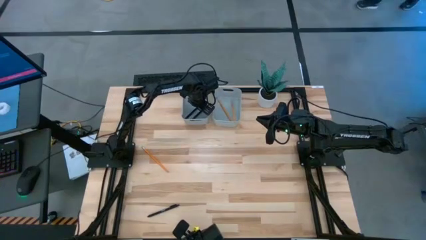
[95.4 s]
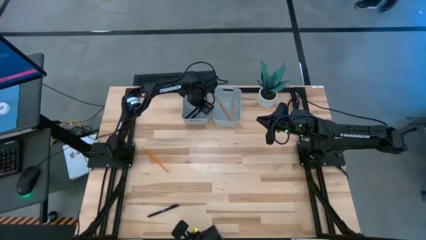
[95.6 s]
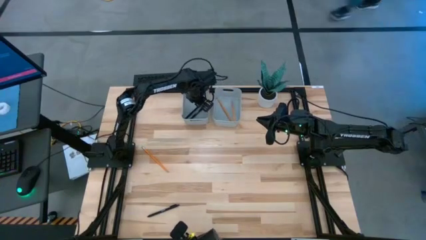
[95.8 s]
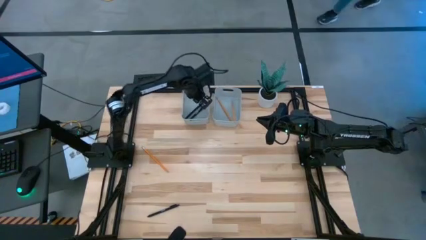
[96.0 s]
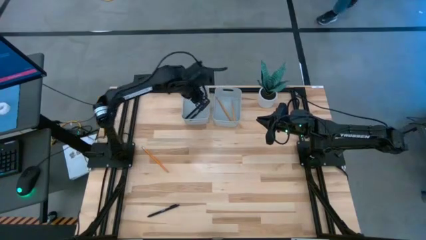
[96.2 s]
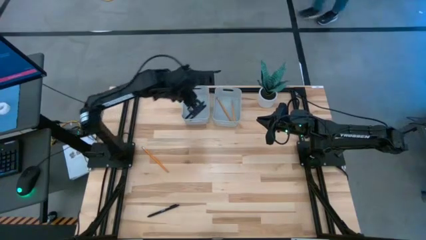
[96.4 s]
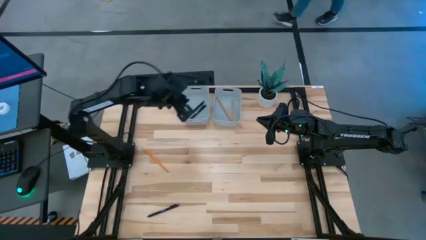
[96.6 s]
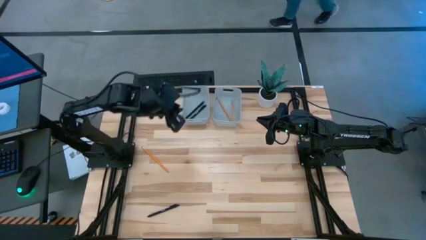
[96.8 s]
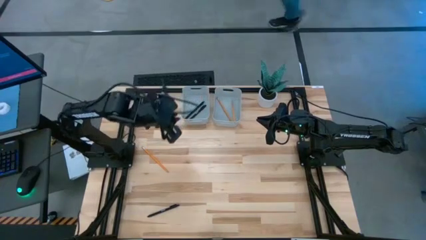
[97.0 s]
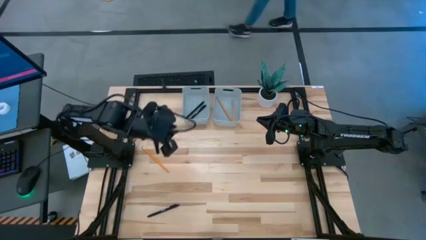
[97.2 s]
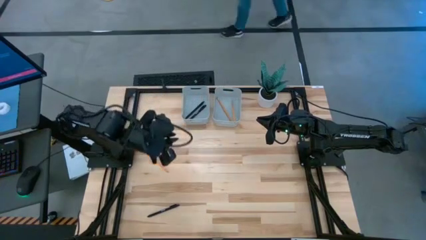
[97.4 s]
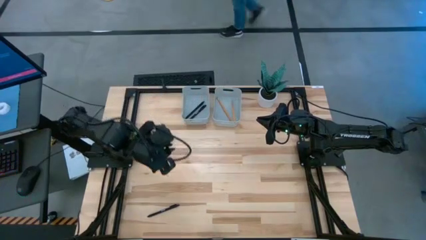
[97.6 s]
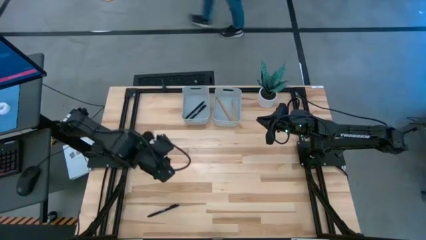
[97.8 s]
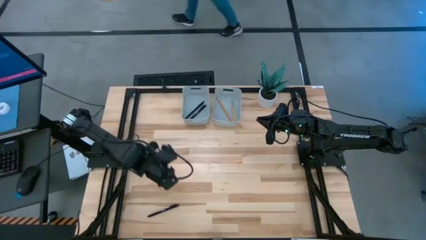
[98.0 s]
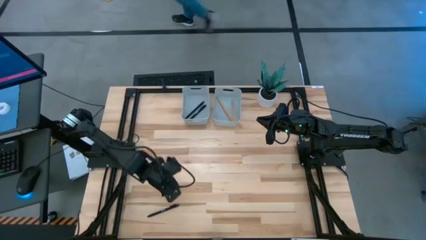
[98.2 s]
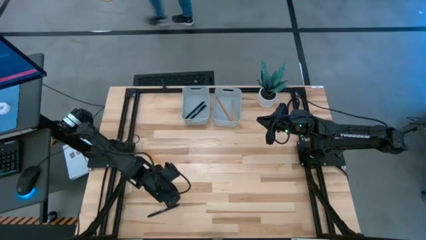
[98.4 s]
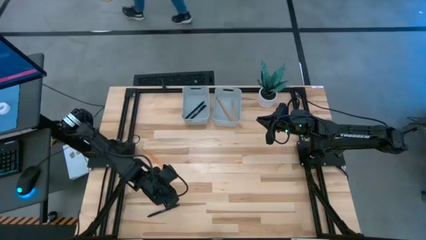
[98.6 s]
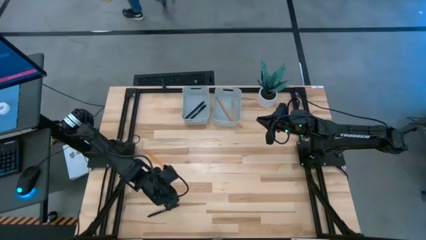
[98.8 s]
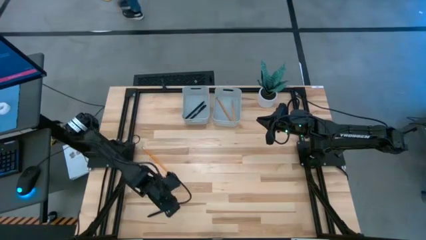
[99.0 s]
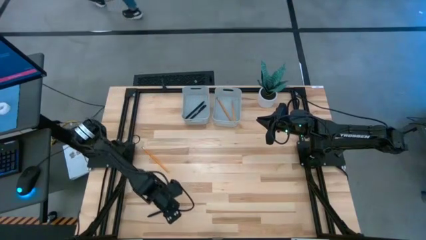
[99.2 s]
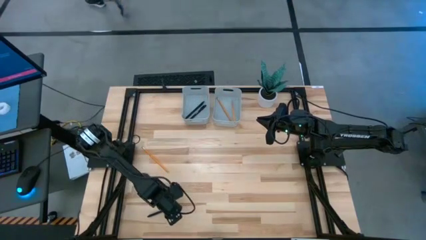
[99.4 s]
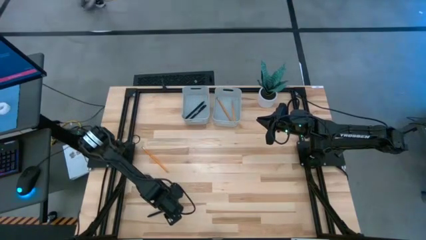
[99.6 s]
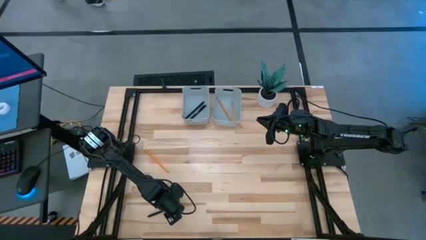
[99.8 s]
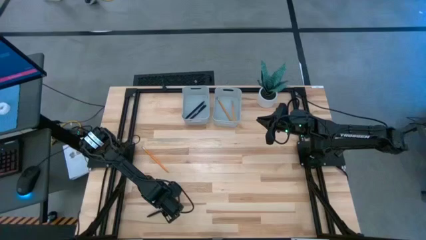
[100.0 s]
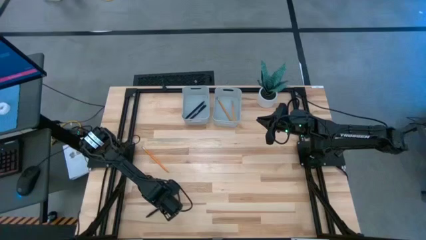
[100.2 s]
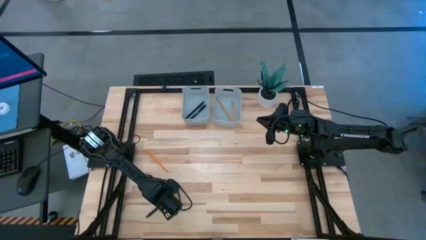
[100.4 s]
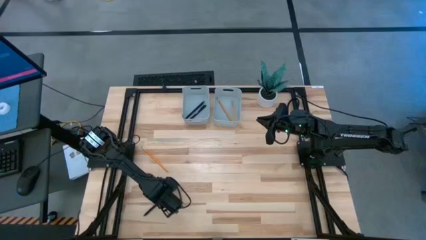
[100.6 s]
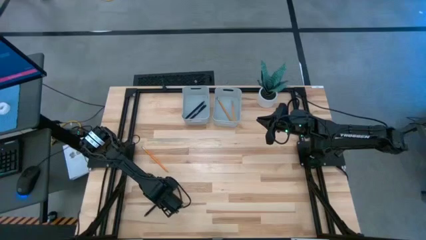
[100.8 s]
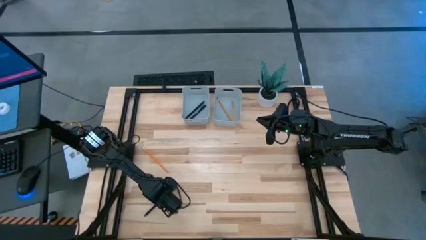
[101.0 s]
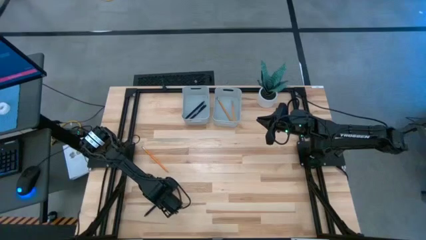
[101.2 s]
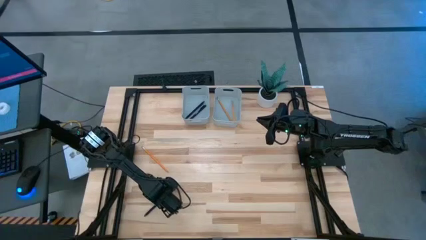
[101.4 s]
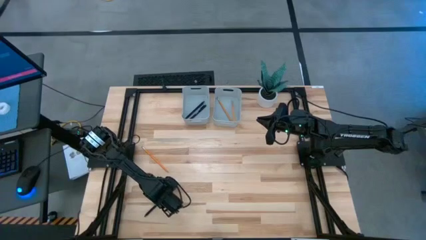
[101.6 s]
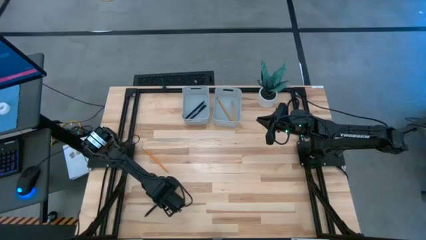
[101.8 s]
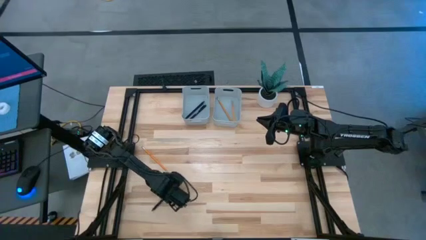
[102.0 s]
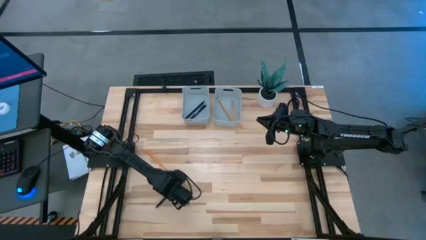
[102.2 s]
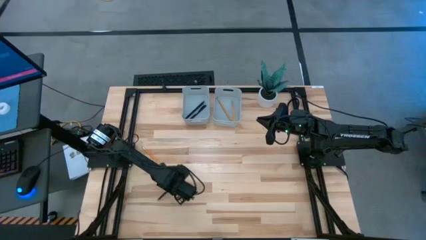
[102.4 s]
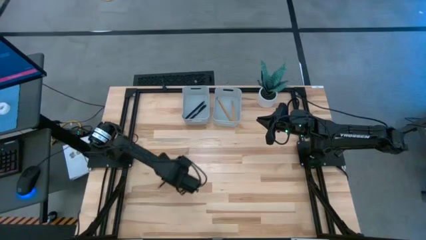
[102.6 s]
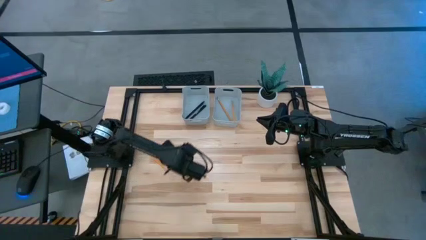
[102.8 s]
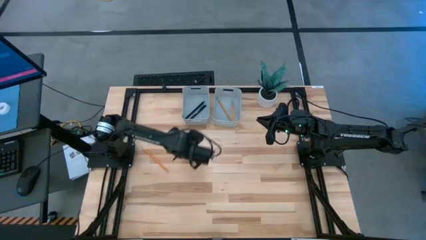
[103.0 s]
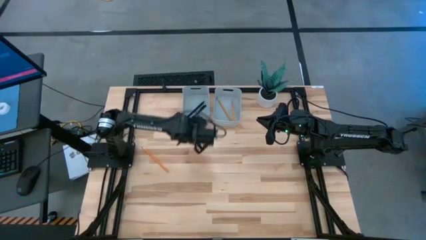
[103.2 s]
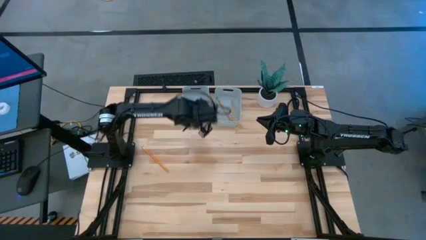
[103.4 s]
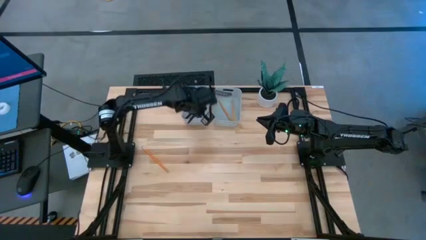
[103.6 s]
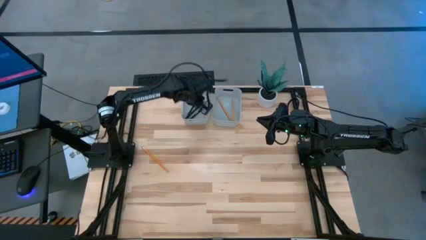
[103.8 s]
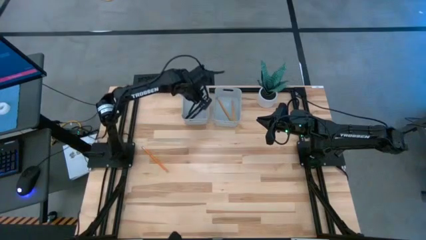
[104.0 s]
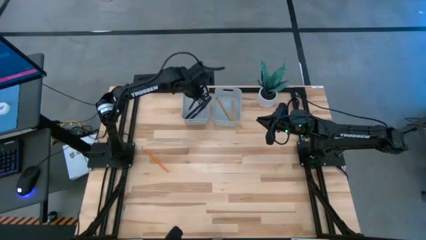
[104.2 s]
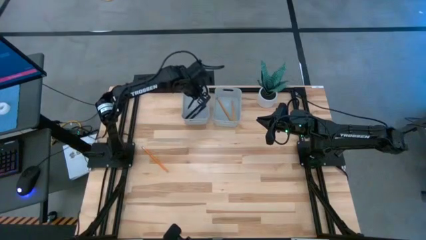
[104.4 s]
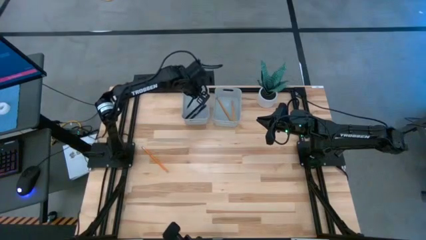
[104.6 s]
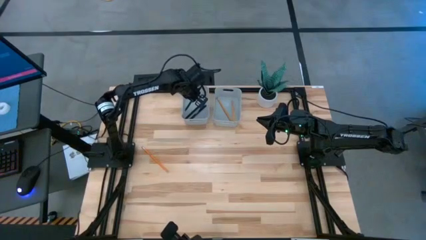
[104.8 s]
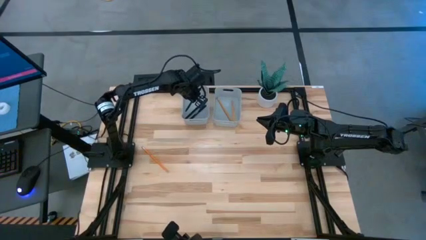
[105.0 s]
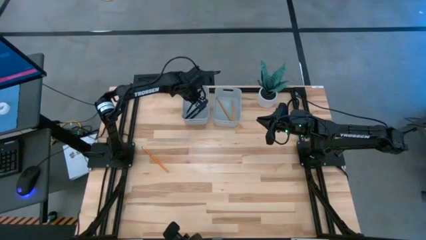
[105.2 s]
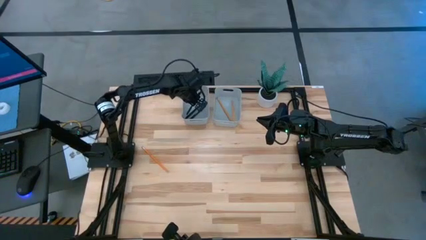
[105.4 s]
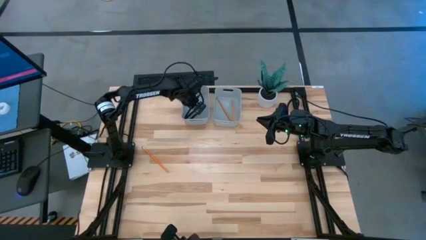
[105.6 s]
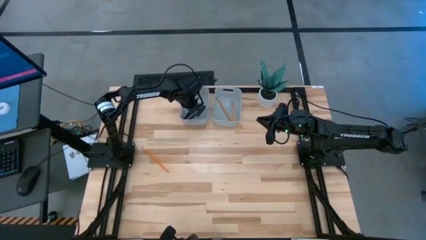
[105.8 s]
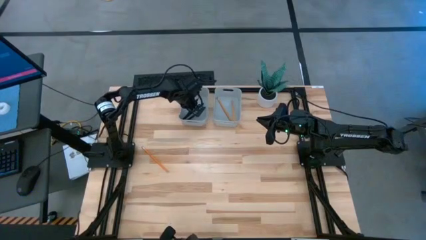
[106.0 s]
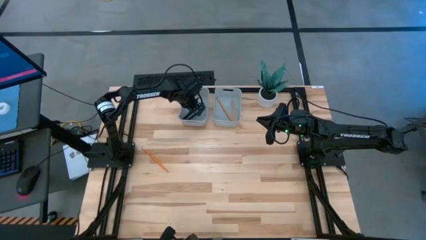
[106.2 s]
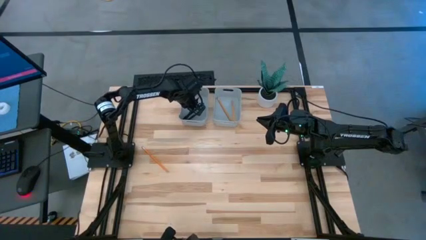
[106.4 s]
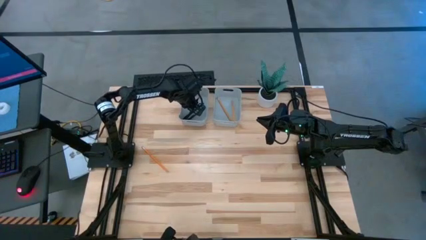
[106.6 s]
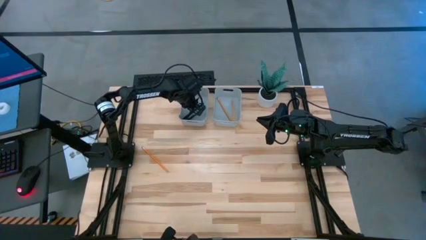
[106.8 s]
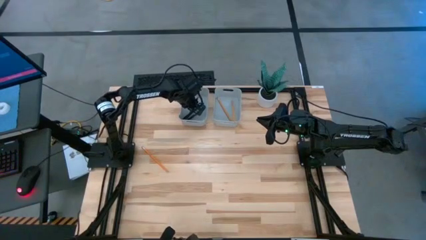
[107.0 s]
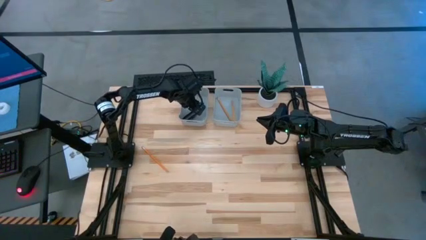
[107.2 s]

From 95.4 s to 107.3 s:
Task: Sort pens & pencils
Put the black pen into the left gray bin

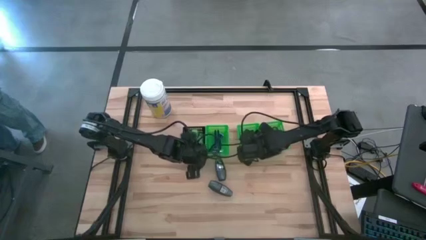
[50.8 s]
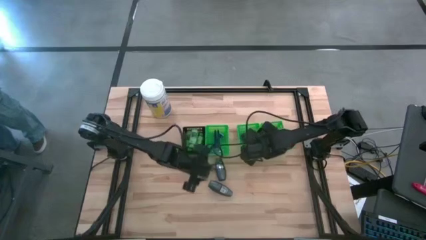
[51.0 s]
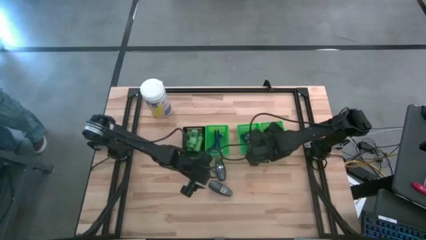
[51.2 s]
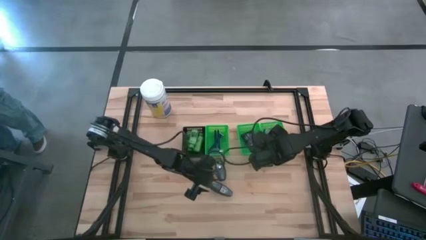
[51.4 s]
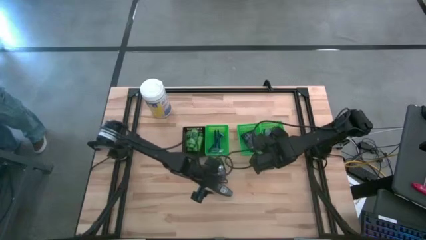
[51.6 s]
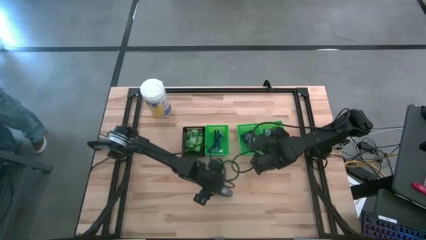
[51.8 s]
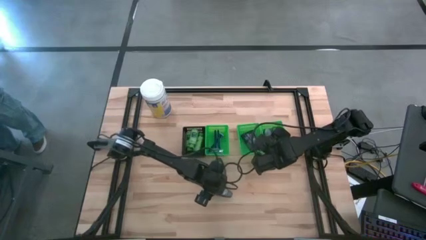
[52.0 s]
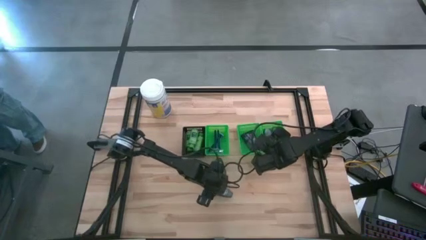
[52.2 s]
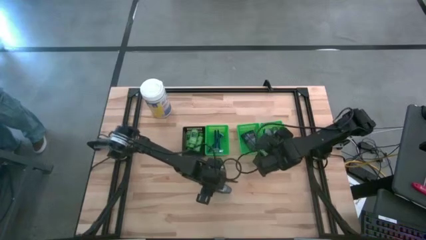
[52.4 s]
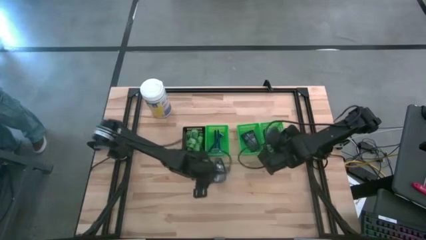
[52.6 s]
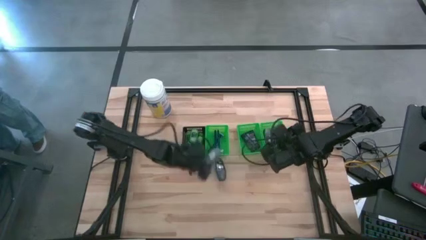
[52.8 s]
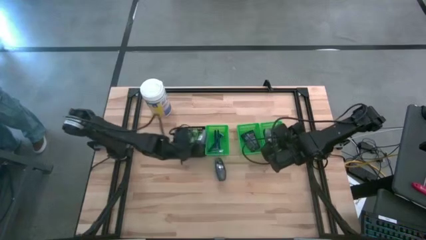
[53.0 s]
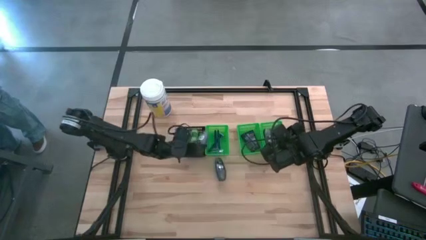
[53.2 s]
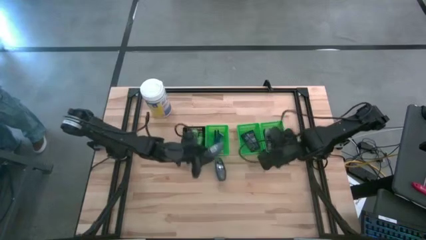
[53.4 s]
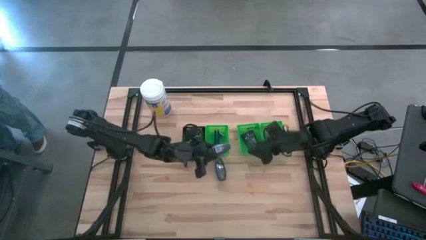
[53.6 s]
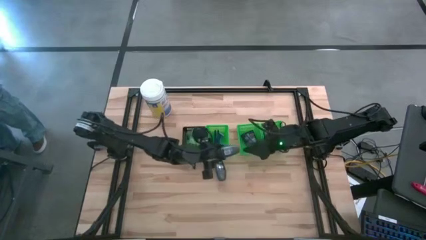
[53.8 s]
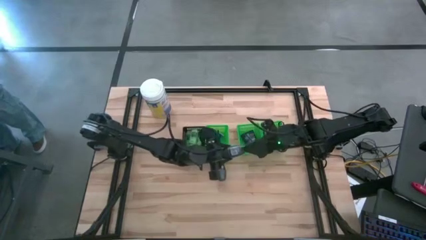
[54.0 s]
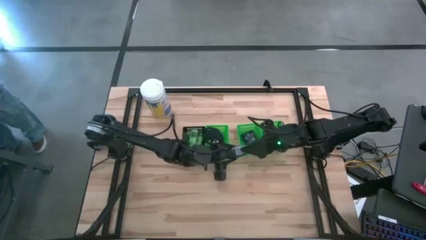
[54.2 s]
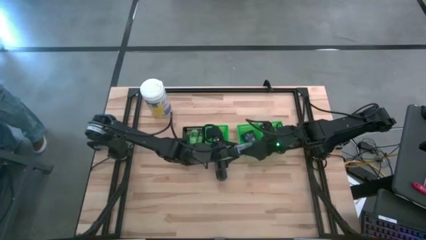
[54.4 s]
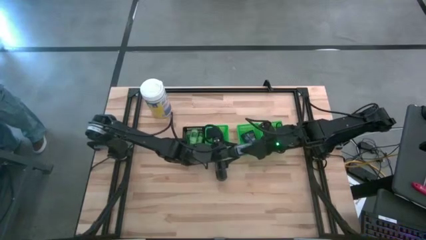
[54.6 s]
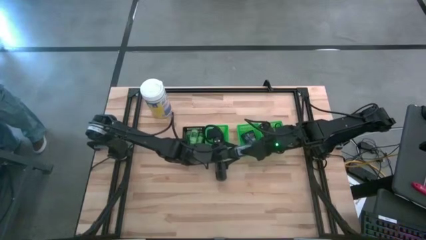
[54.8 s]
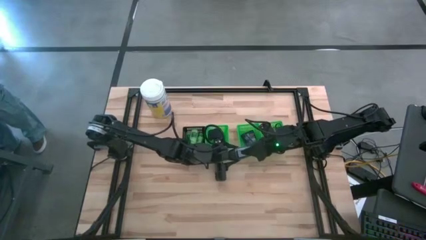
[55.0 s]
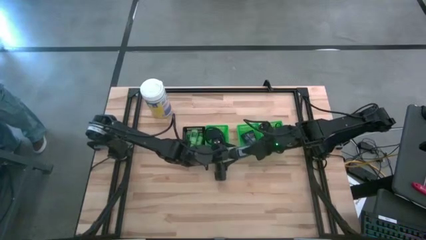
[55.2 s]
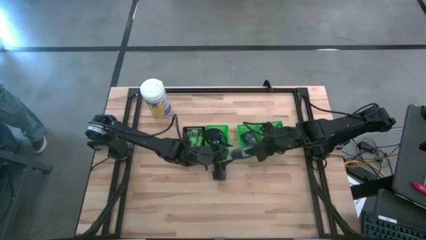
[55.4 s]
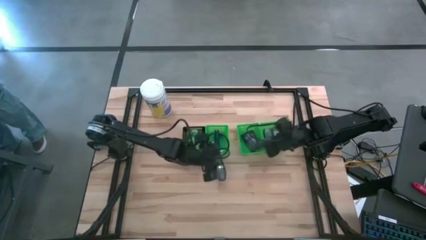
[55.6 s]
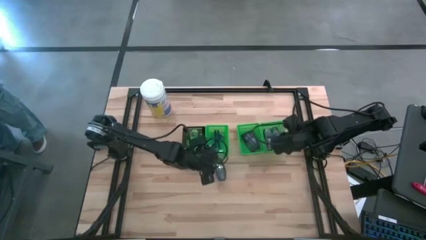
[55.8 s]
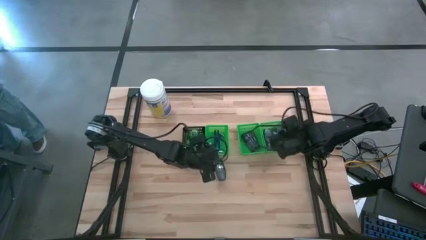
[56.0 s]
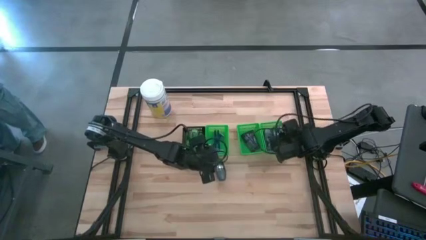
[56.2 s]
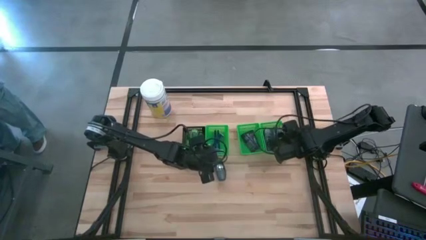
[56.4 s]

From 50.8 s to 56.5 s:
Task: Pick & Place Travel size toiletries
Put the black deodorant into the right green bin
